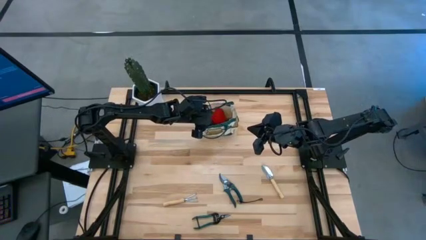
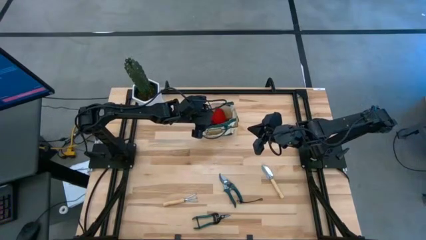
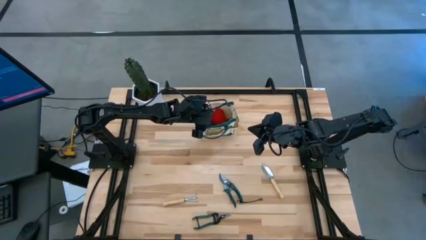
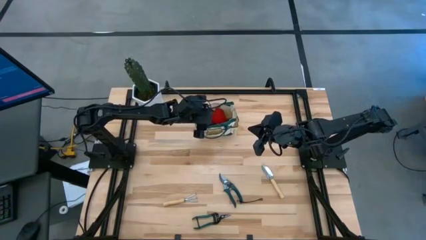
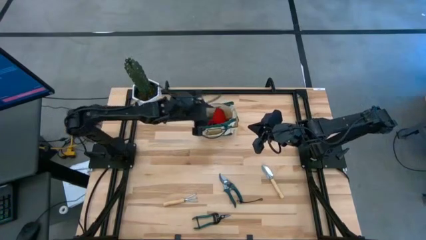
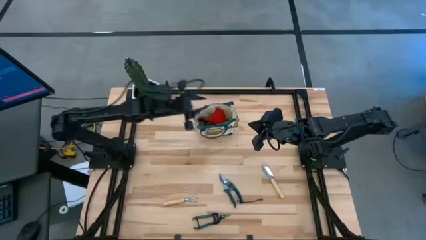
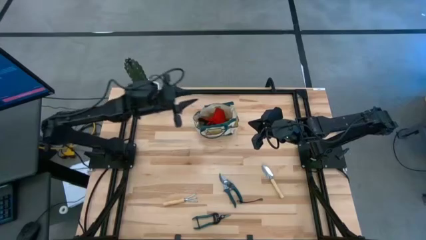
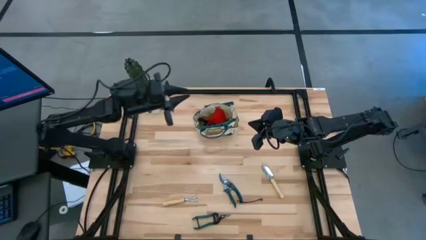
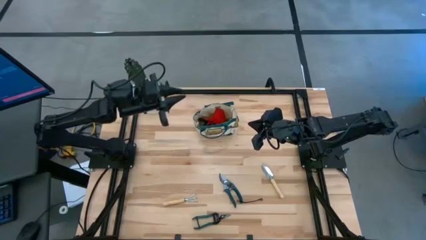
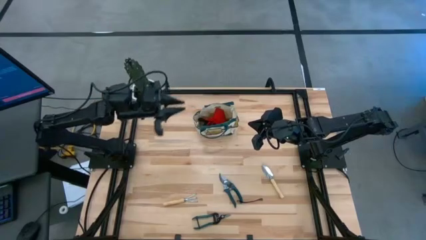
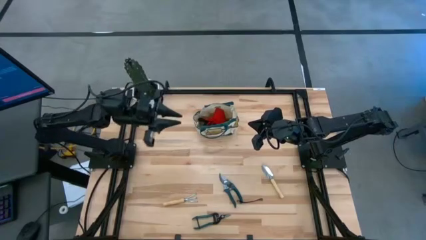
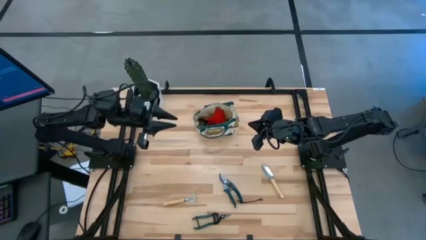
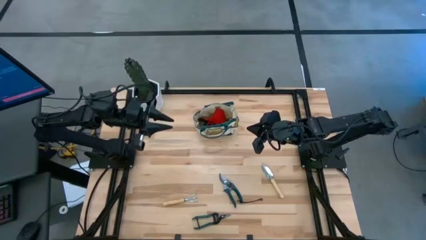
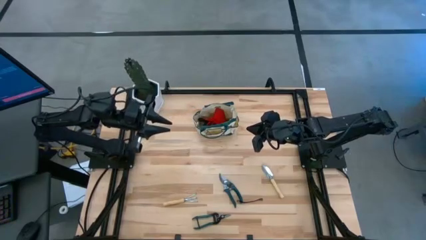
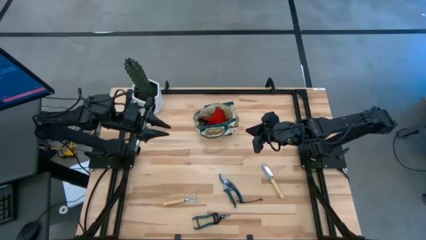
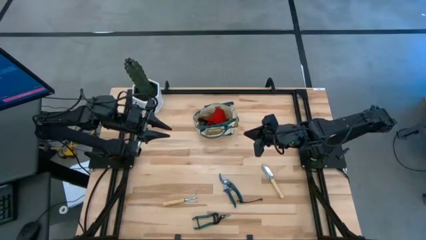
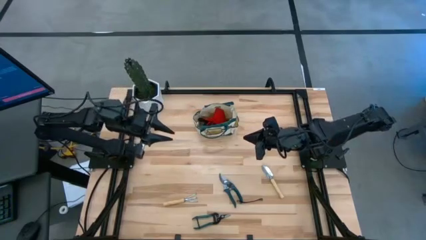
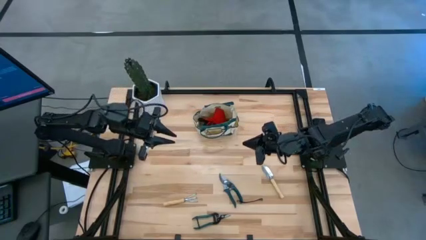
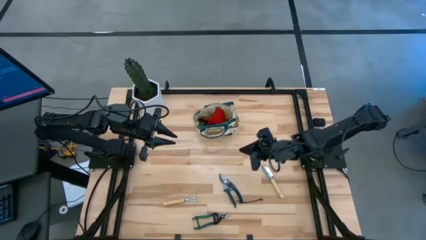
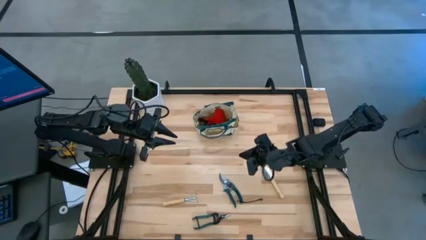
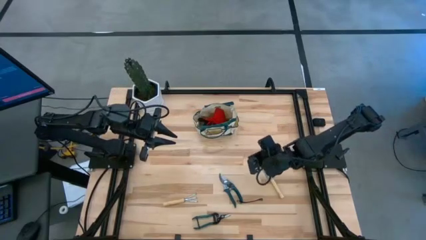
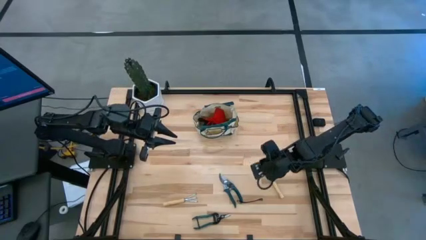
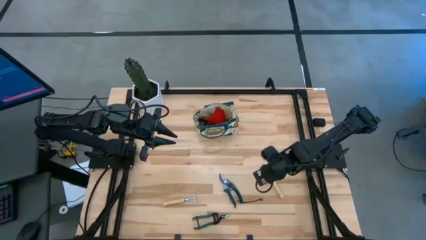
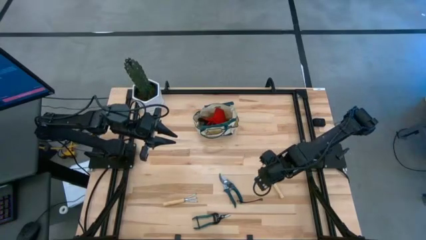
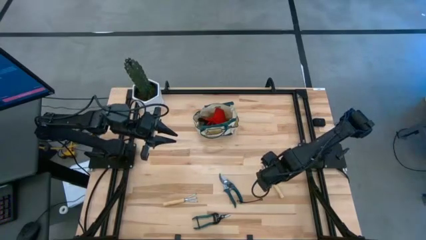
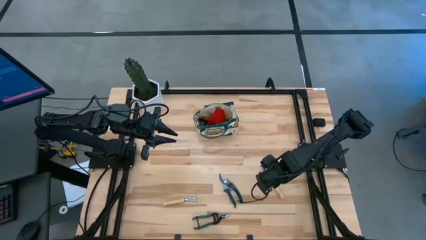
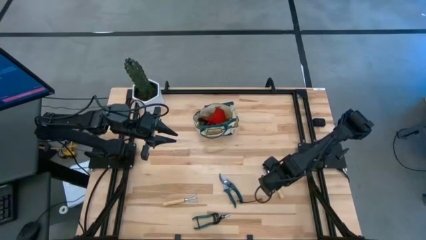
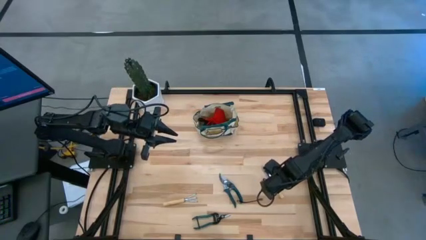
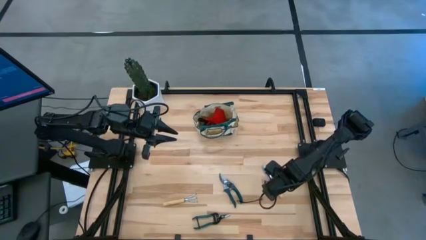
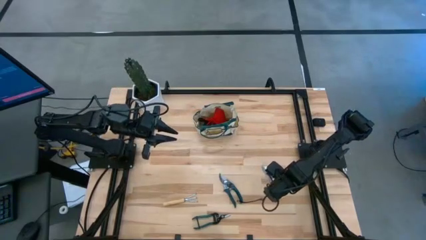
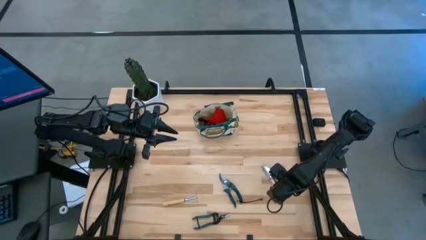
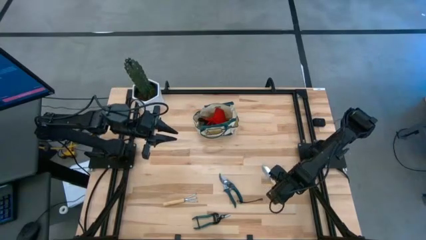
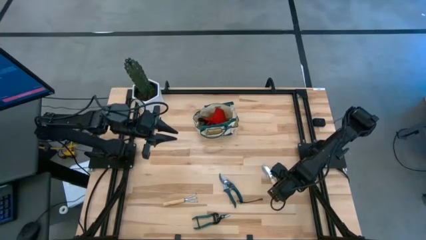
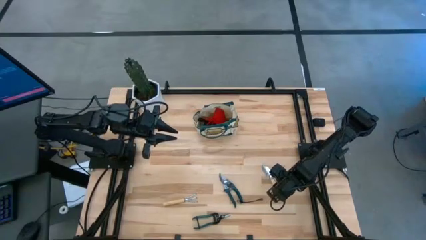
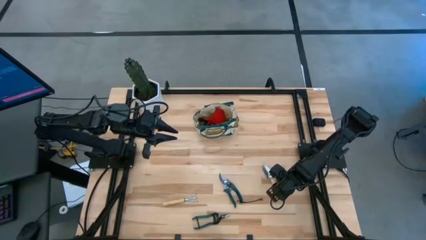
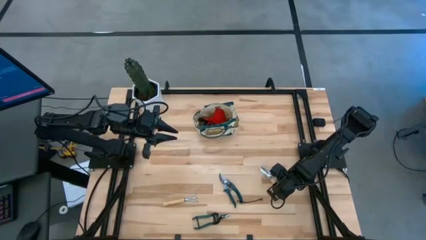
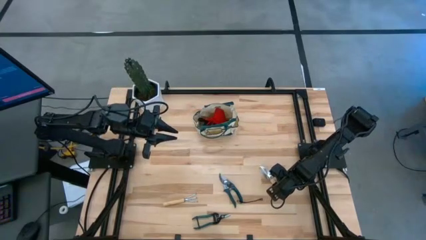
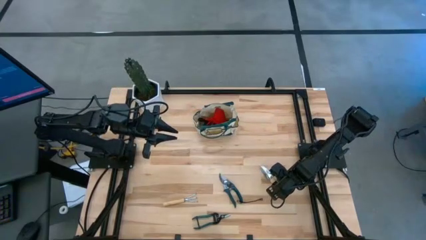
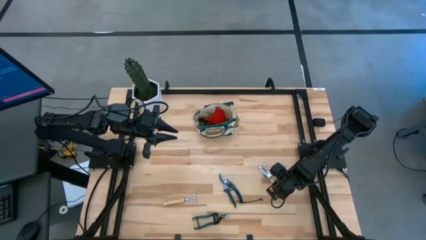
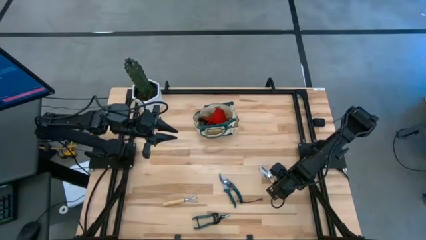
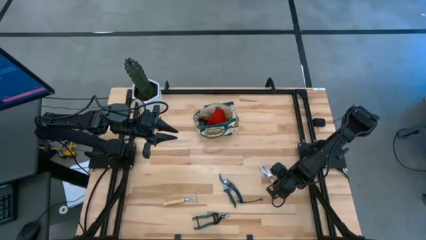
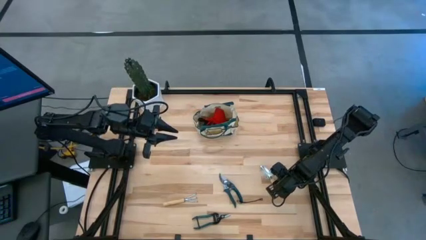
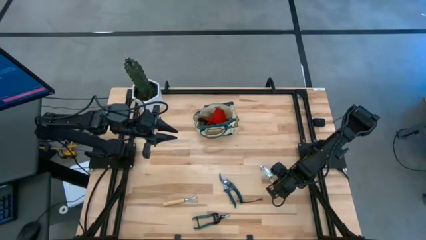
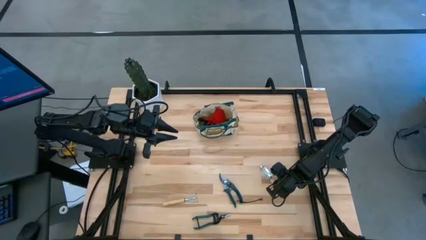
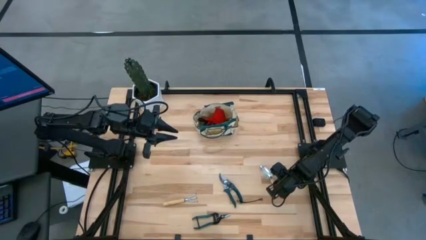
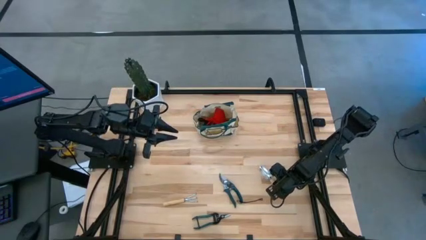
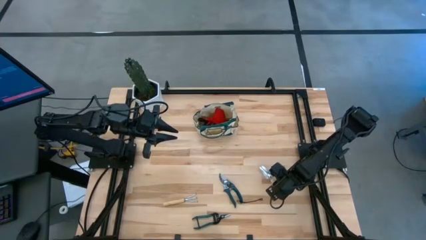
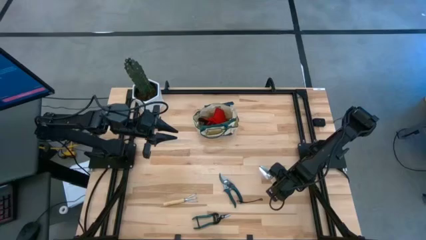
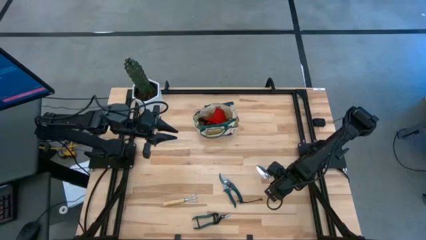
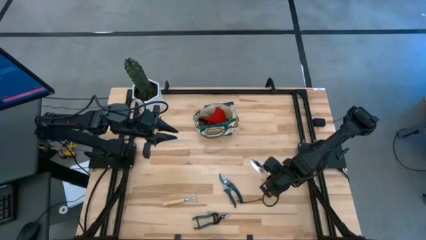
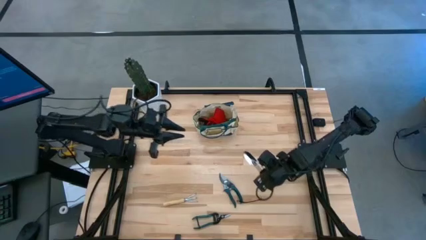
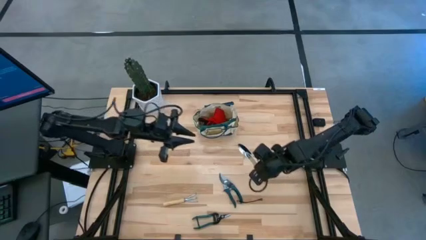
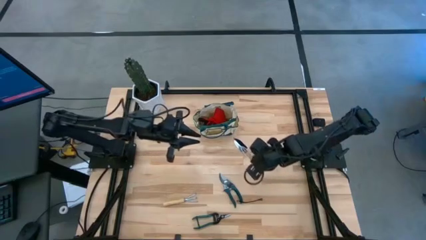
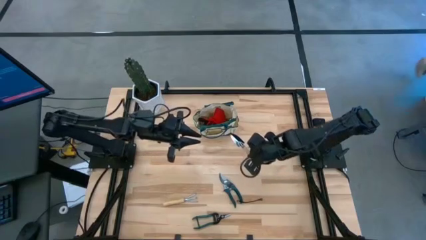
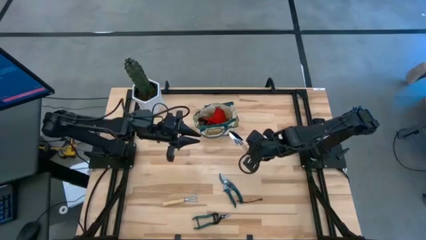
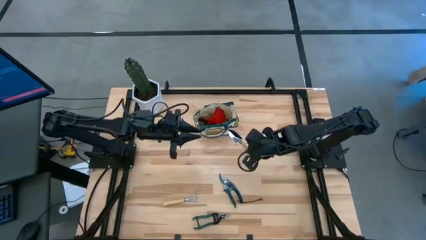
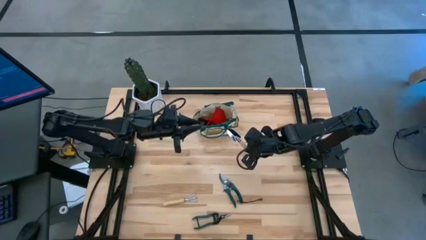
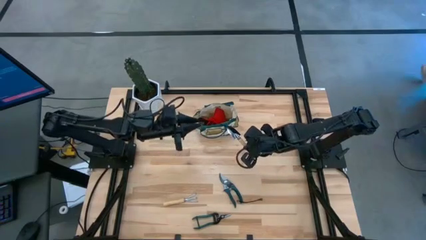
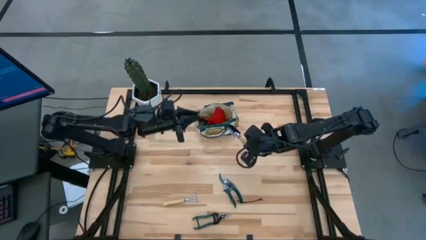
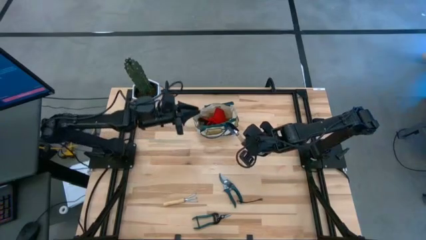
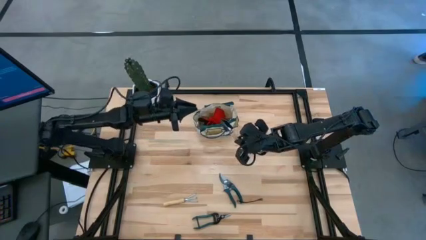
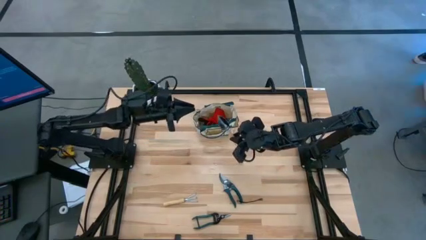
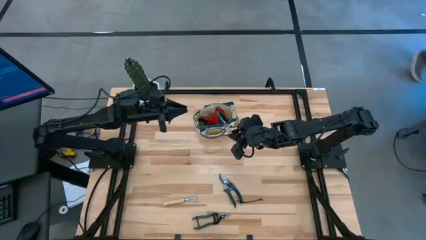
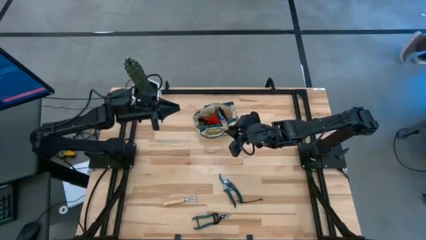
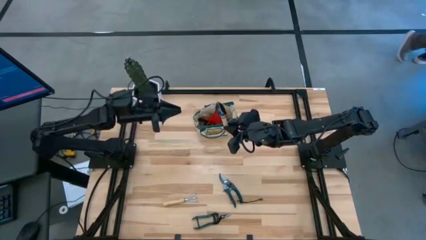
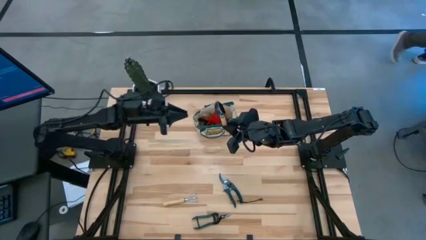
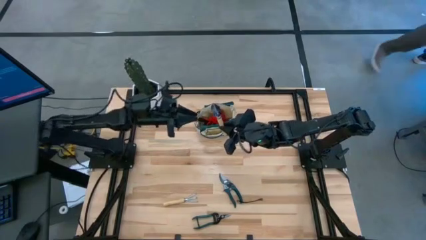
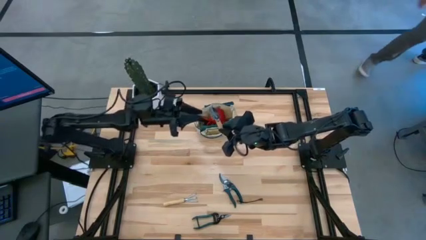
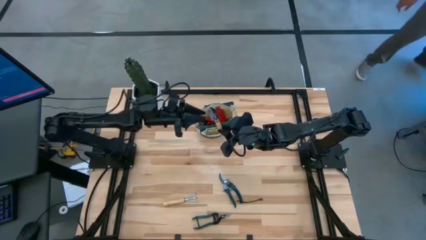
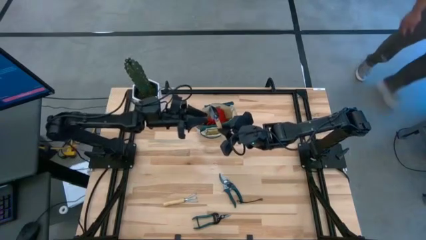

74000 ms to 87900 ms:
Task: Pick & Place Garden tools in Gardening bag
Put the trowel into the side pocket of the gardening bag
